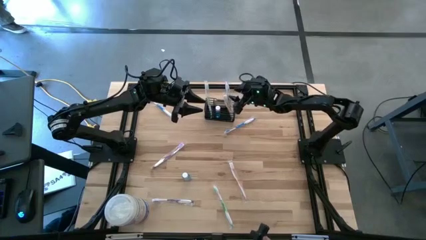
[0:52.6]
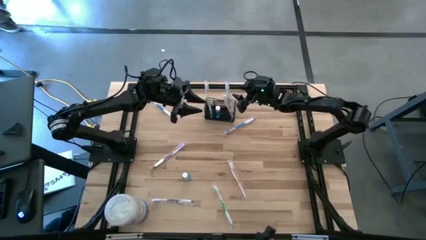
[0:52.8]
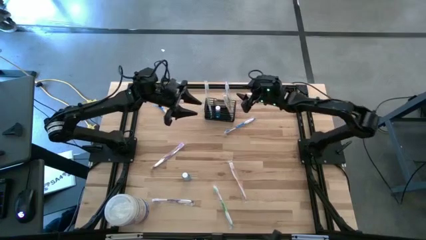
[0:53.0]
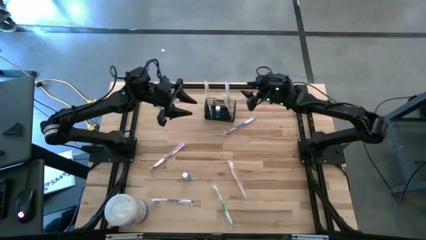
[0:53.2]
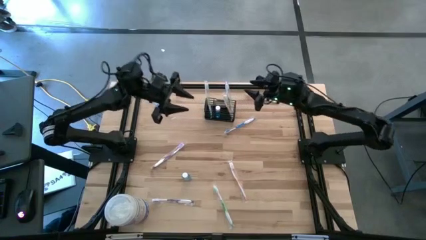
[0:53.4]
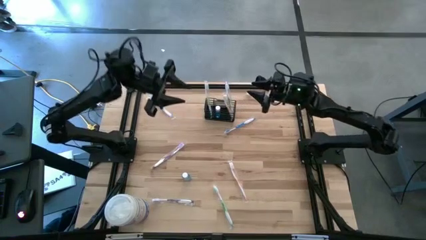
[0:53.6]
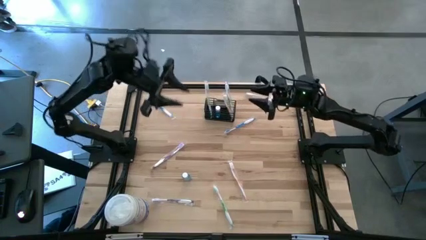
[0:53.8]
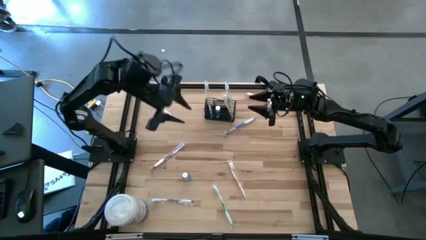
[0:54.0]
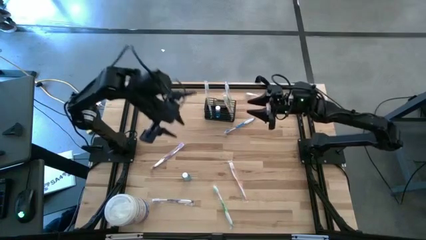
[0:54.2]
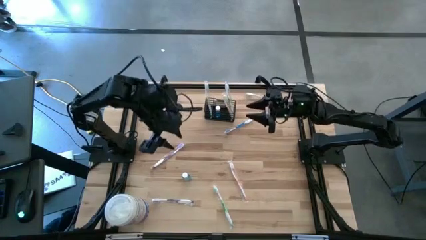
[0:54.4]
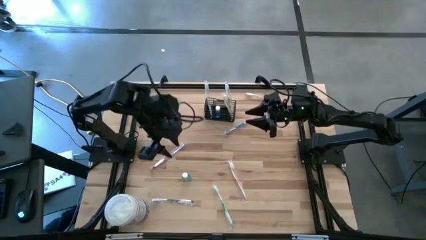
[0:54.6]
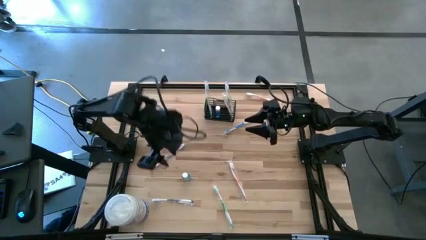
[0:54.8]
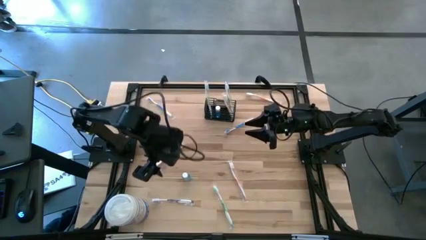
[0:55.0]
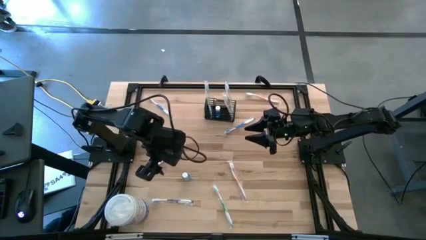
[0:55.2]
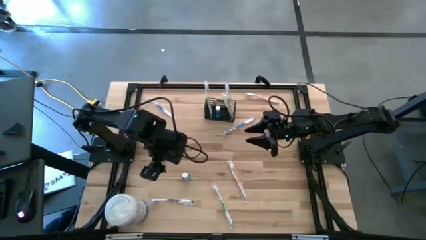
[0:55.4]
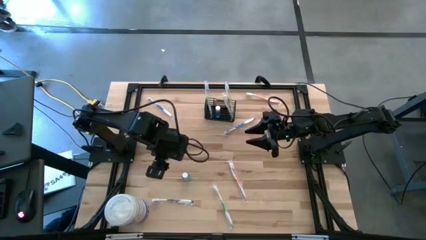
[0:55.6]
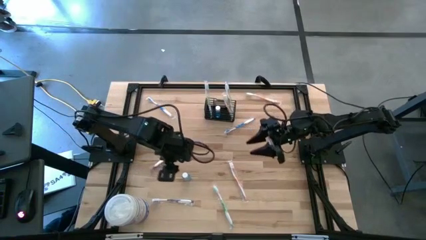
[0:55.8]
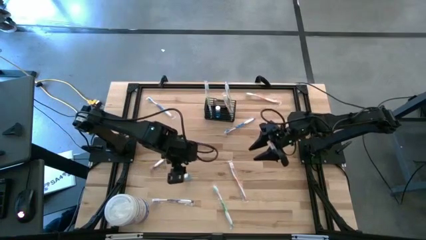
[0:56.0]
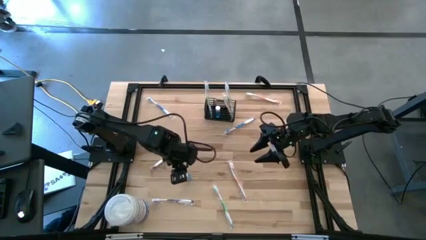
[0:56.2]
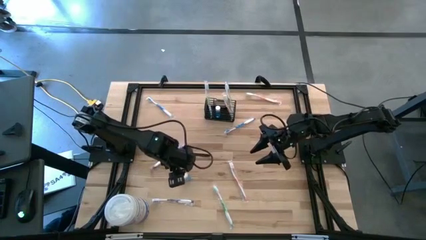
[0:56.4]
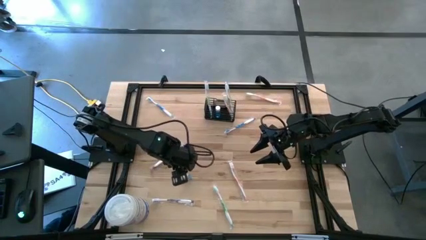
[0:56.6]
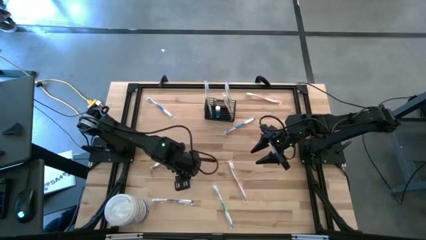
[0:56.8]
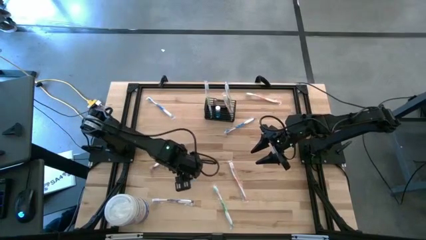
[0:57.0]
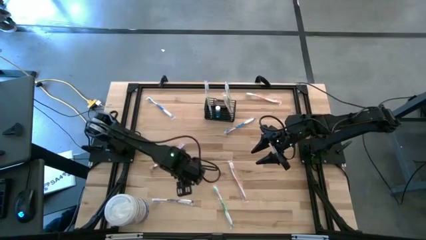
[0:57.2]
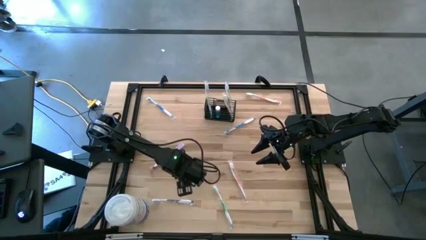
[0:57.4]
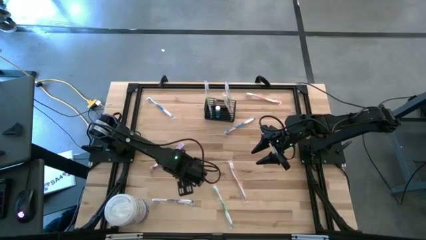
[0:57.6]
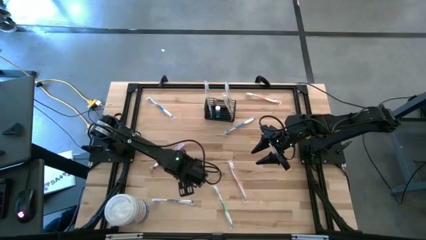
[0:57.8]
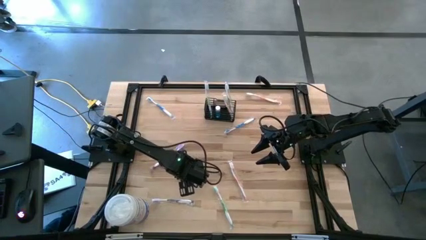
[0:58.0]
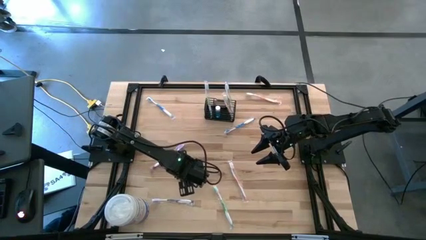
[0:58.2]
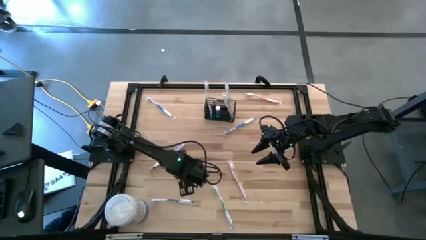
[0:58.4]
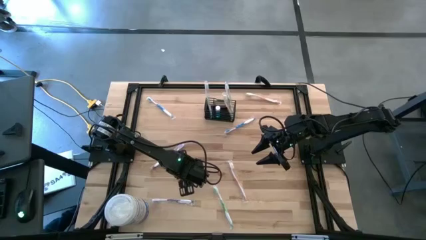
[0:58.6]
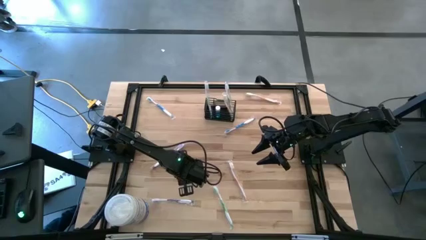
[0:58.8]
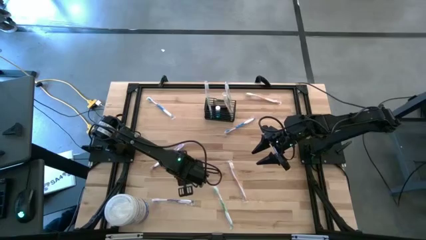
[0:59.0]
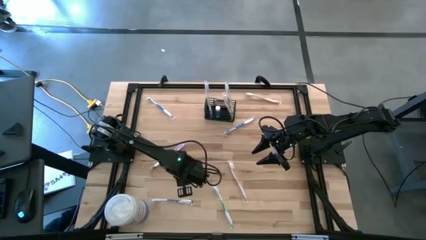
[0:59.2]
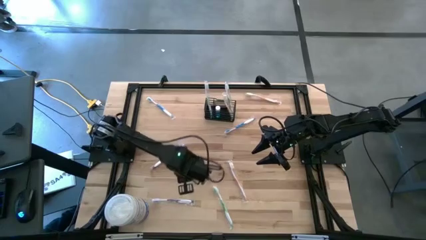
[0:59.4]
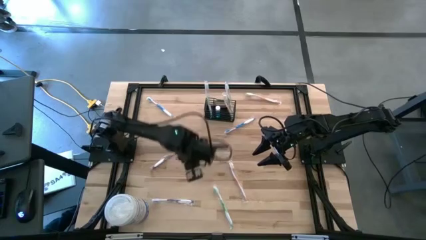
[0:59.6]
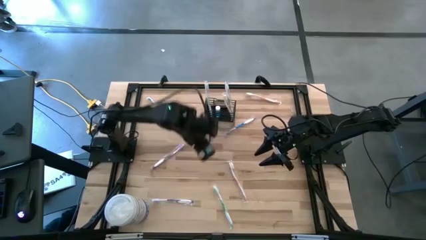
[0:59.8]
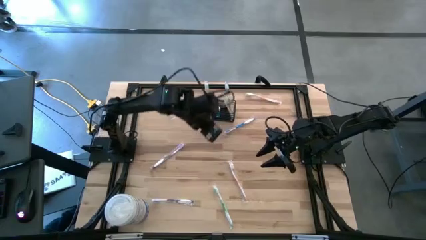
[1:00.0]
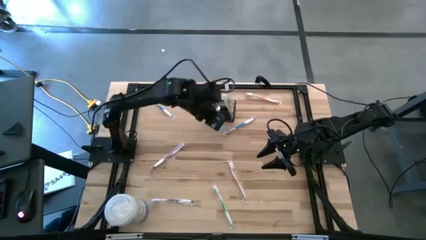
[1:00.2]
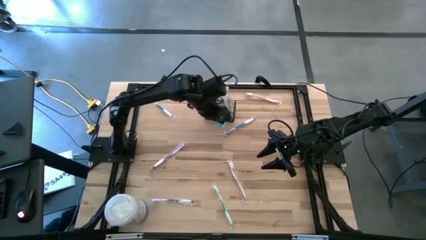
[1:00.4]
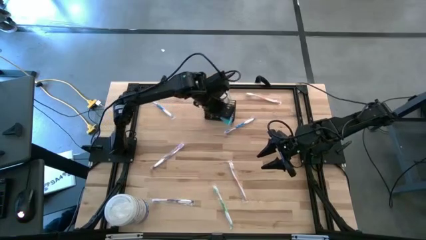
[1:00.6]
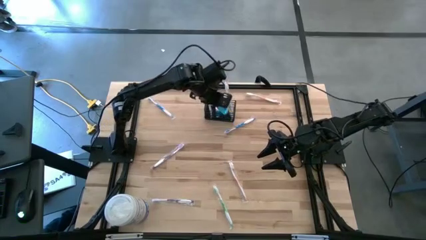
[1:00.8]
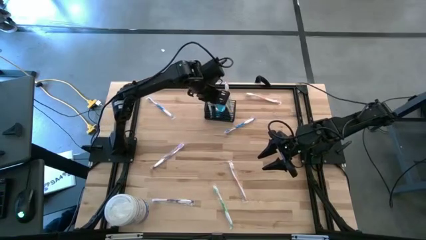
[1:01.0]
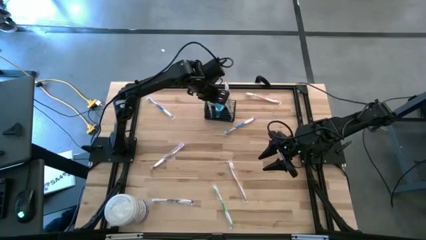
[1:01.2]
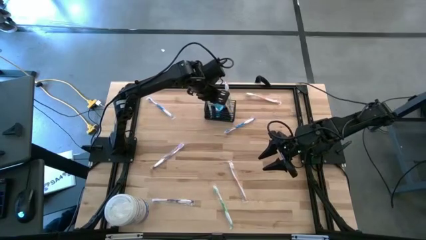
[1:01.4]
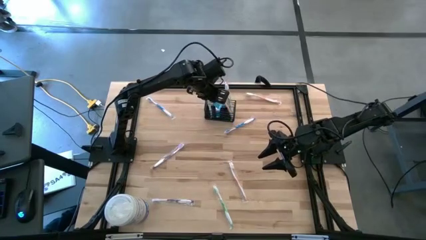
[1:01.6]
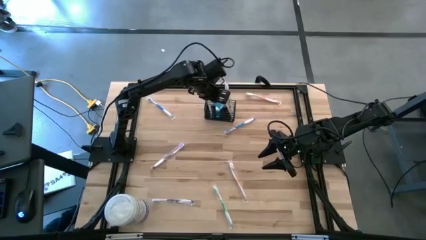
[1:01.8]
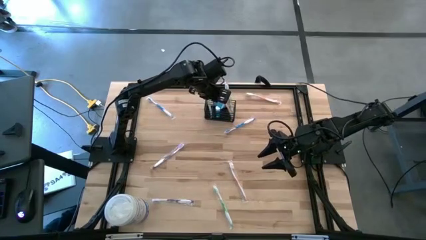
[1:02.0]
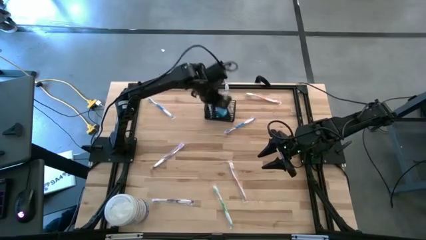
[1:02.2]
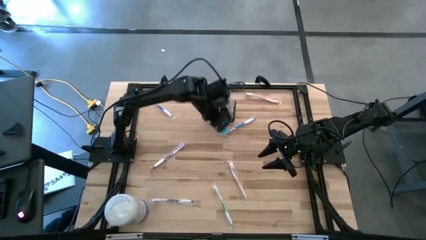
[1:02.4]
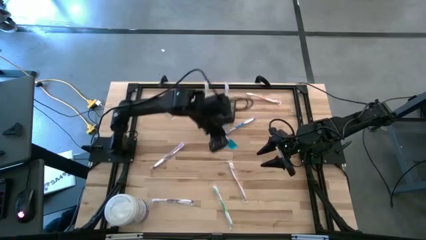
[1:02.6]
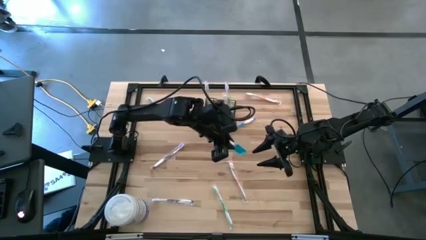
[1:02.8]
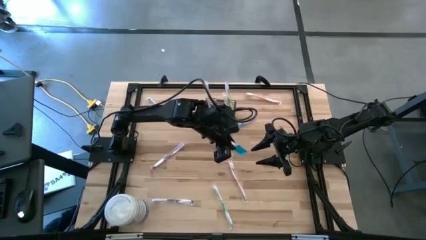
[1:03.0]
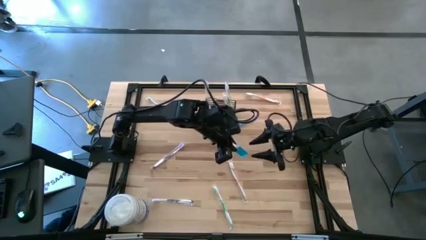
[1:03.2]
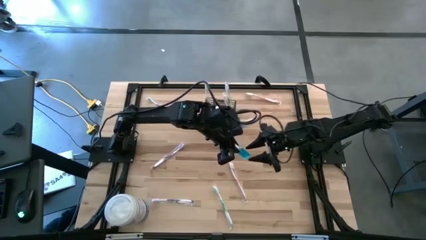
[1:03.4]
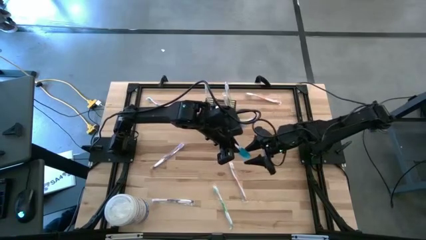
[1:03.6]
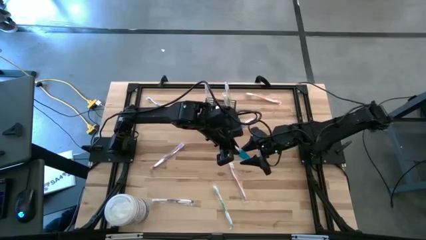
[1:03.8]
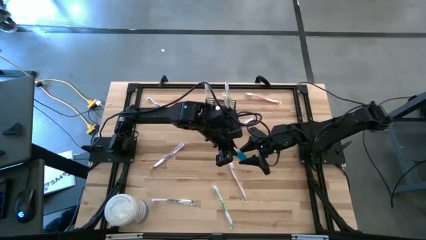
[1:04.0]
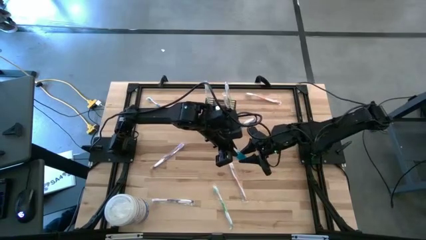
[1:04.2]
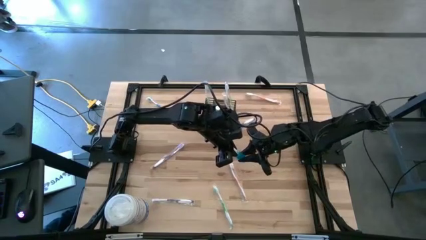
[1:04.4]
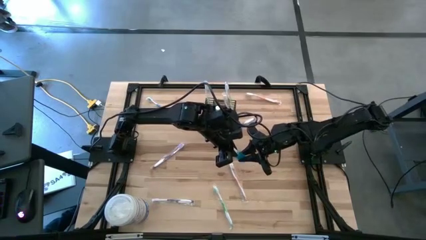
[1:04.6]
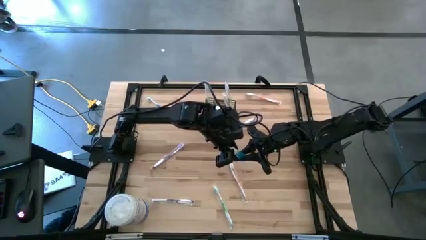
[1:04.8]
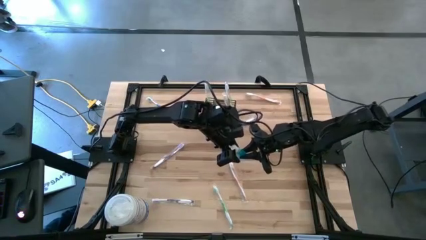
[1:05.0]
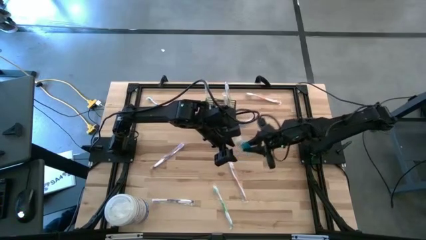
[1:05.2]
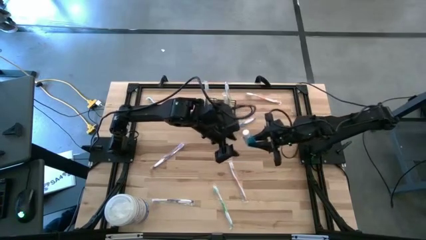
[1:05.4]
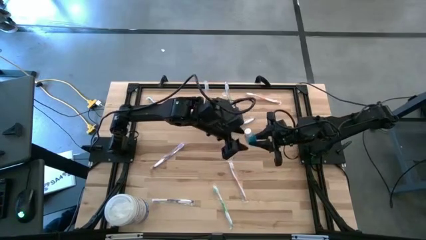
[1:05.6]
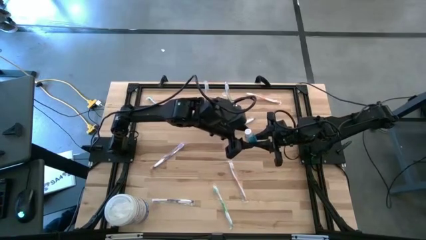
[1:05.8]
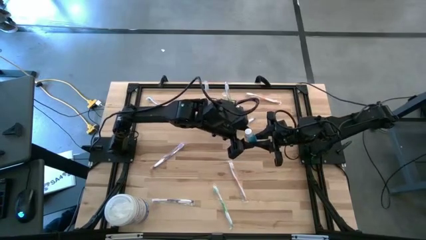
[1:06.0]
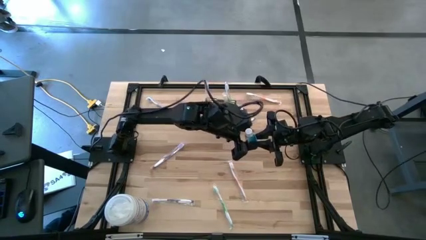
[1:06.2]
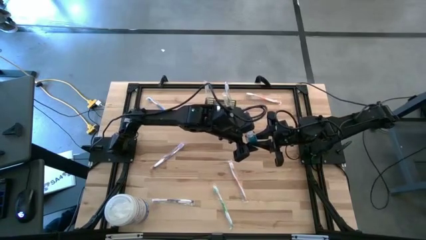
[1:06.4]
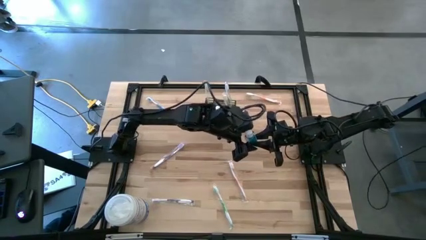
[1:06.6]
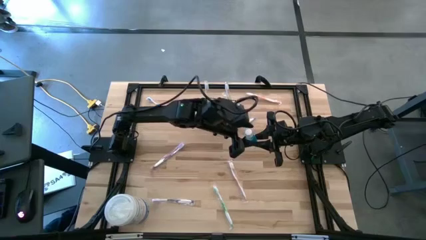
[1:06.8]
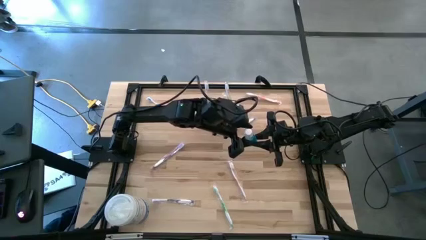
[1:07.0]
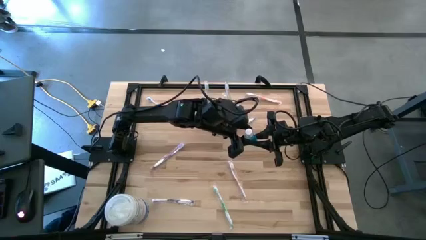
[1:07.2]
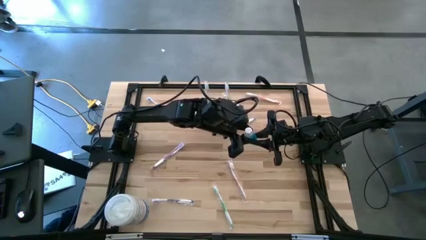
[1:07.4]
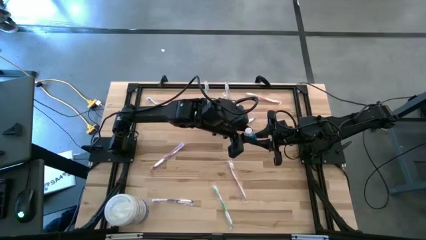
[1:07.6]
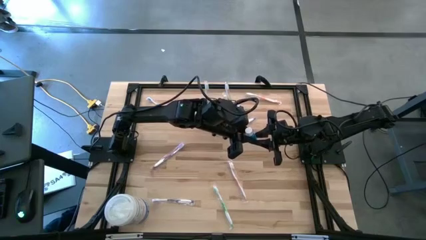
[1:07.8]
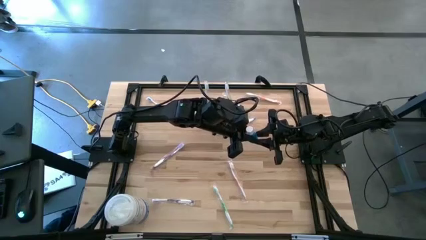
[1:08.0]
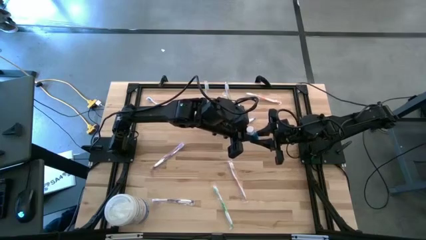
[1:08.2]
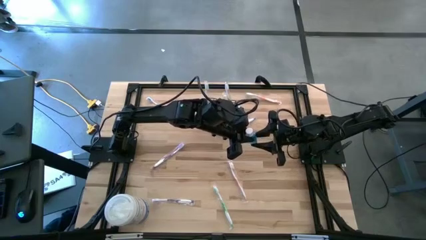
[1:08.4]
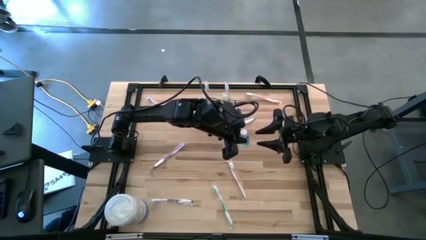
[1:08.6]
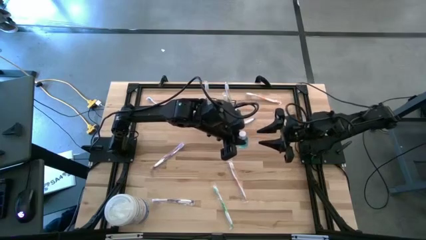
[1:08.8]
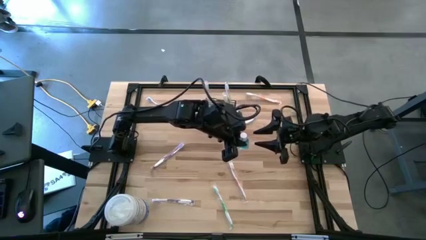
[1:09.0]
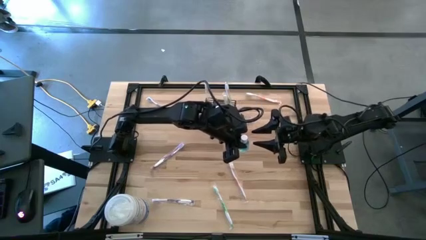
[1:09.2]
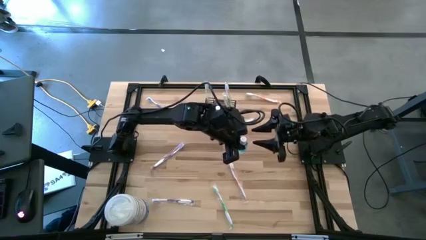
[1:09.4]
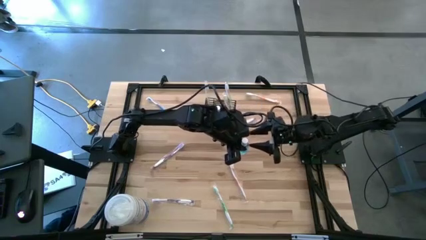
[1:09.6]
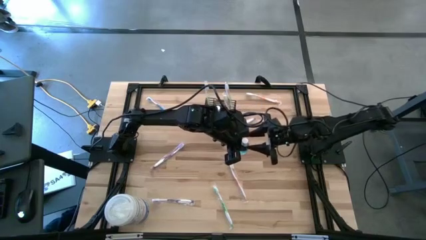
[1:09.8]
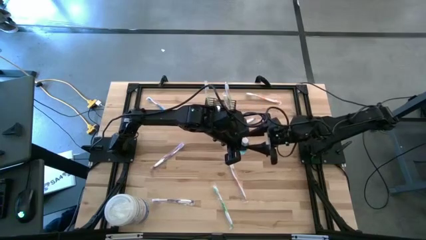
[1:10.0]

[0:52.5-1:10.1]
Task: Pick & Place toothbrushing station
Put the blue mouthwash into the mesh organizer
